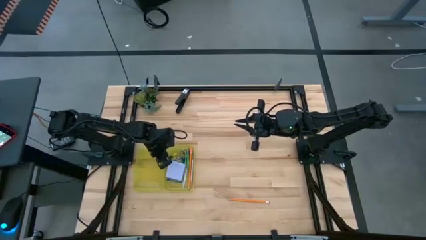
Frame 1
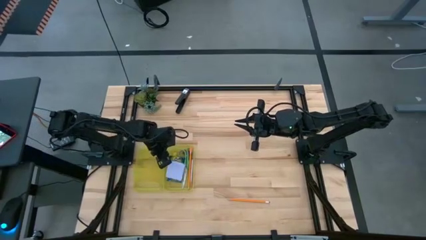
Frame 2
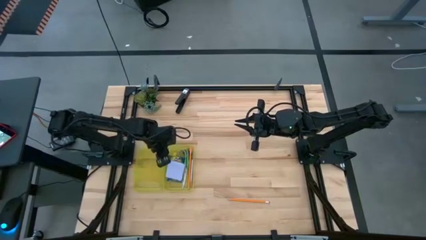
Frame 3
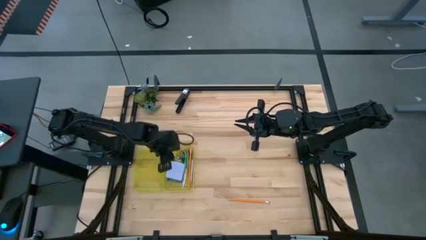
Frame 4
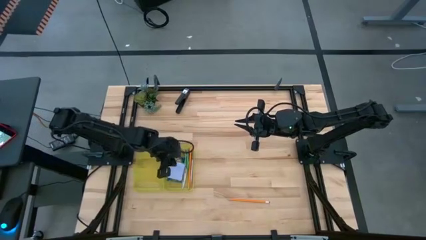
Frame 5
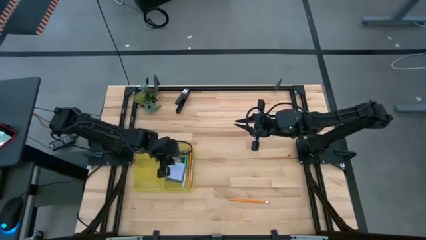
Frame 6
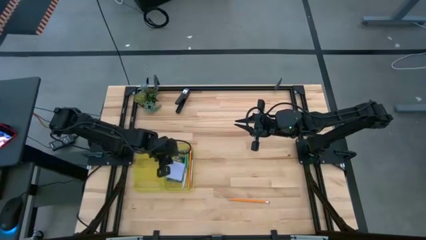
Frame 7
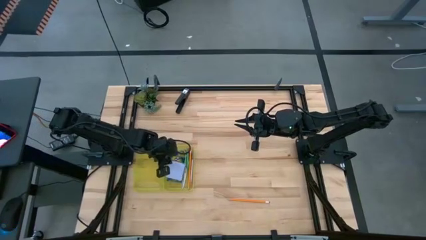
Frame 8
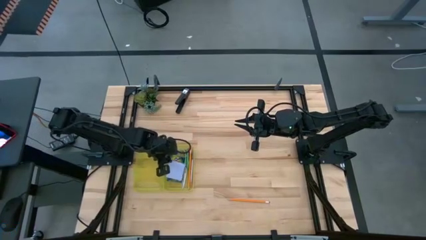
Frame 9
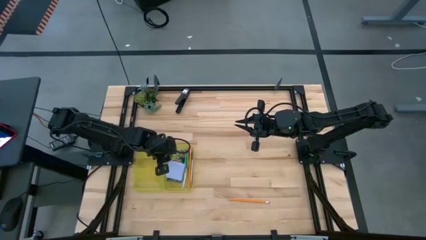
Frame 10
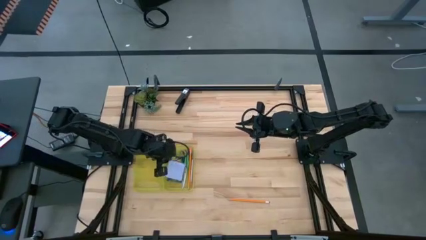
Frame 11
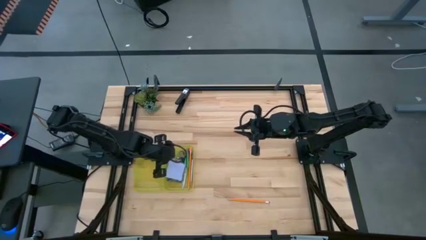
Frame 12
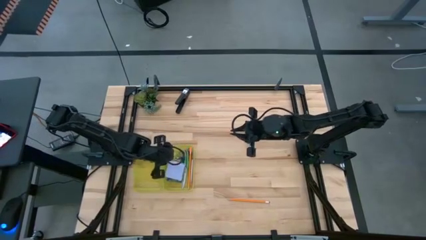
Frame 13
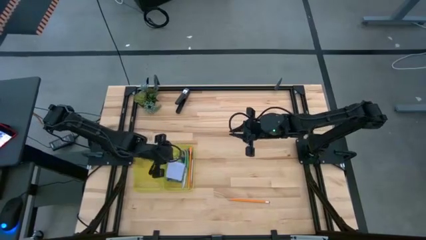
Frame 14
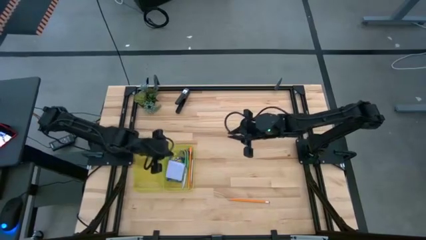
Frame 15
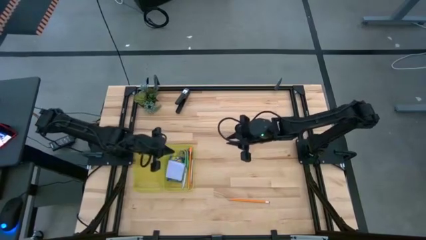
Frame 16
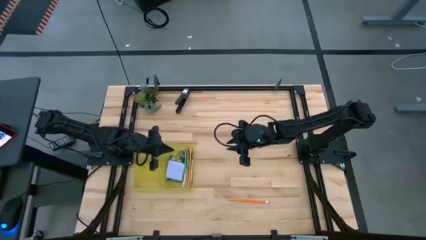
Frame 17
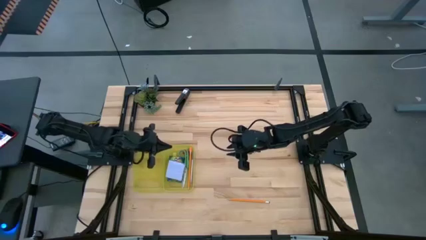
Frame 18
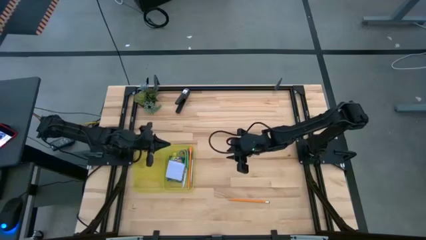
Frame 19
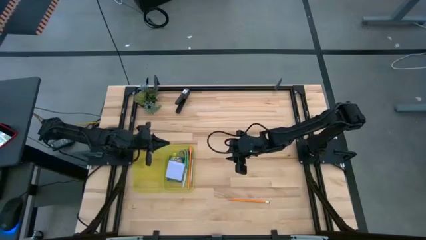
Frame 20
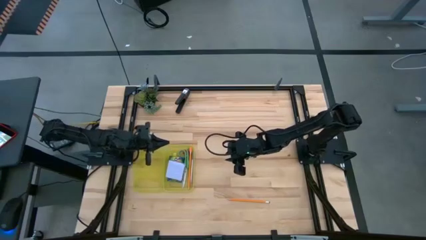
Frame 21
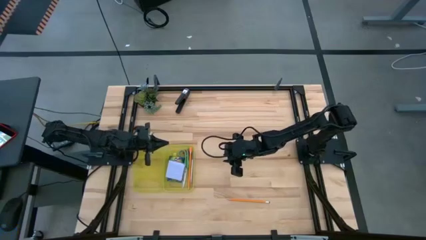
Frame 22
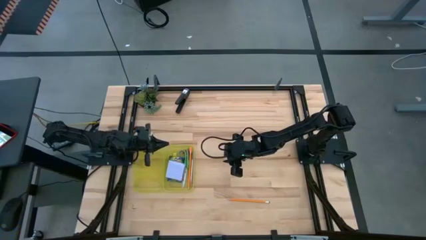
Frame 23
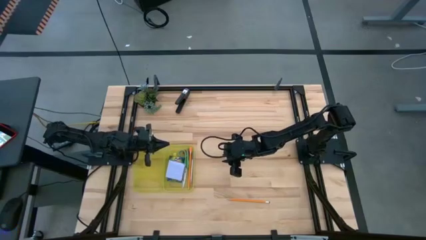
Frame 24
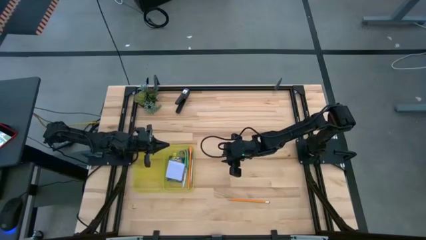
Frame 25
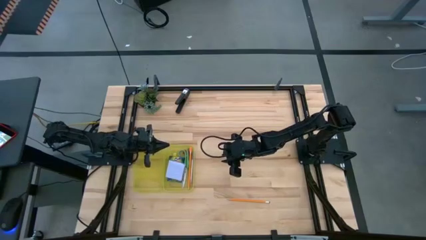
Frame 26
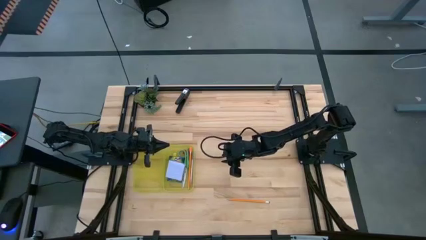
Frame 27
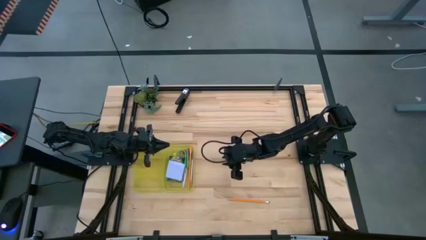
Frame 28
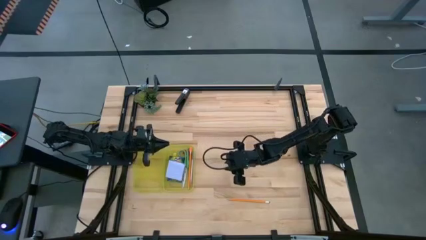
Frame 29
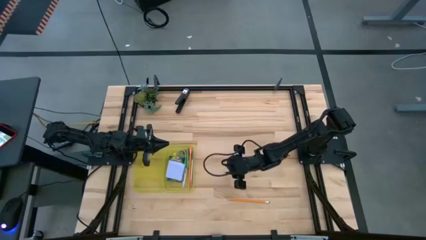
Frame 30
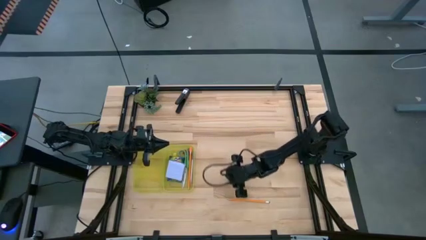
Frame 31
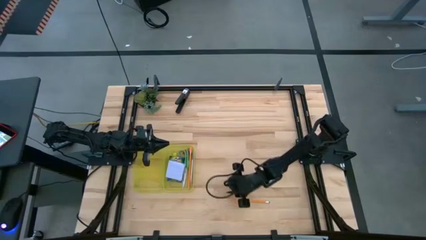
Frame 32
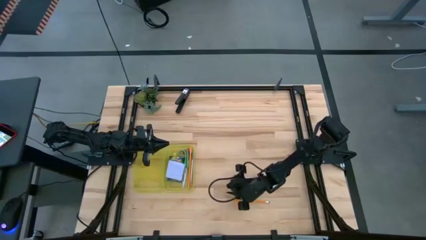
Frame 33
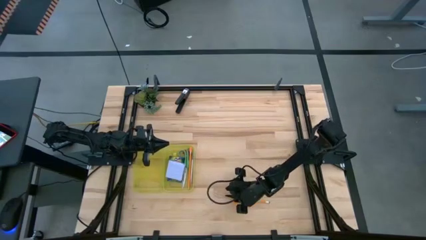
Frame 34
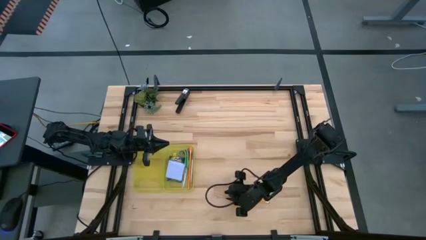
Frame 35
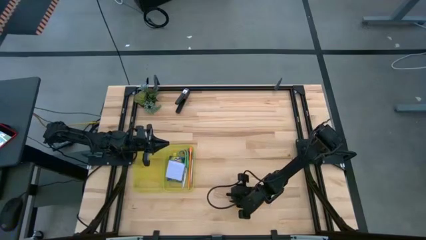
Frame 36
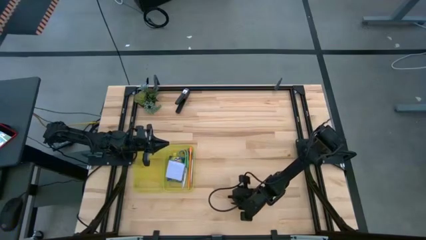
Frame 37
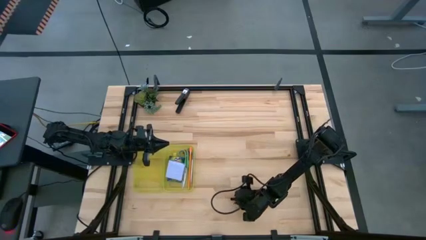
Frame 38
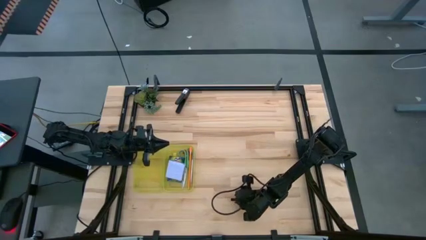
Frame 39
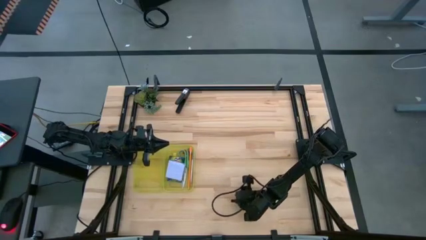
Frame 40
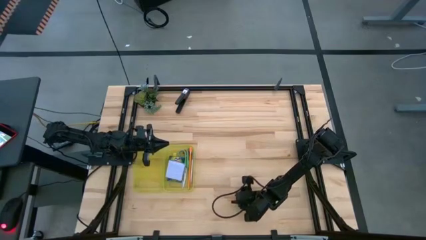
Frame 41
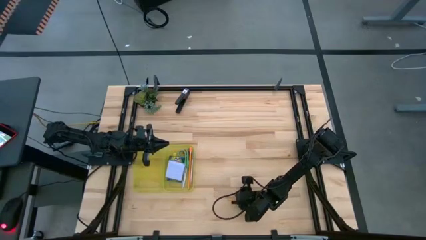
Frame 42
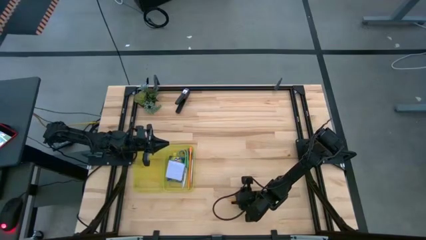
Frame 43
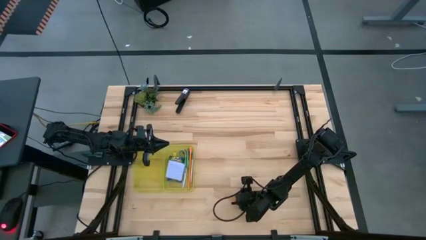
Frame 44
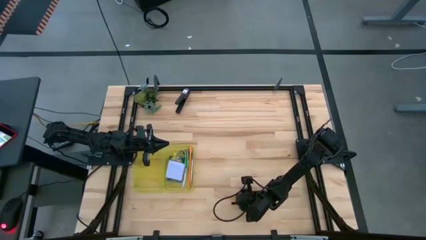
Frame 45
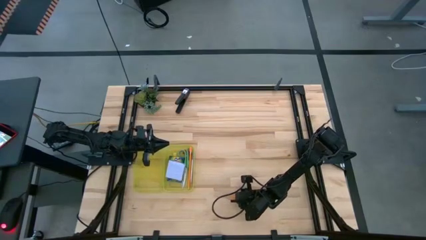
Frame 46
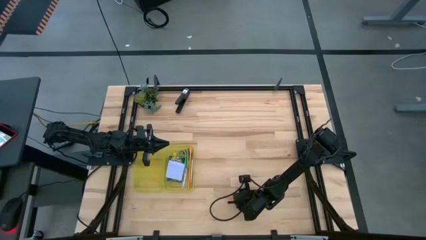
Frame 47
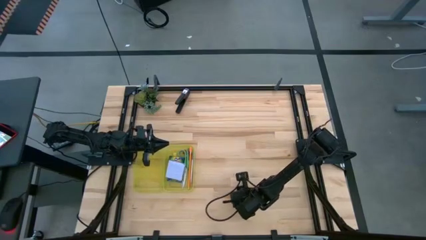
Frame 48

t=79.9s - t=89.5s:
Task: Pack school essentials
Put the orange pencil into the yellow pencil box

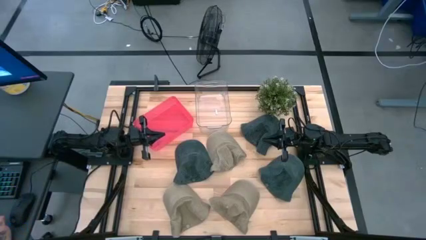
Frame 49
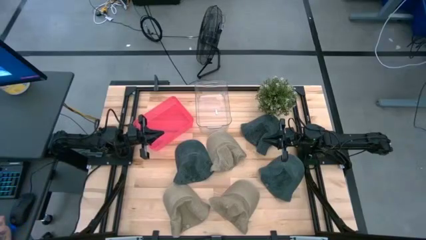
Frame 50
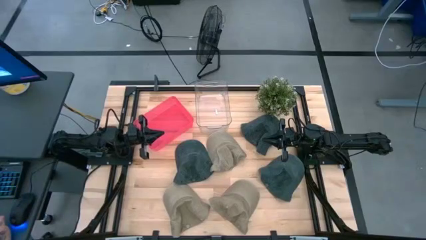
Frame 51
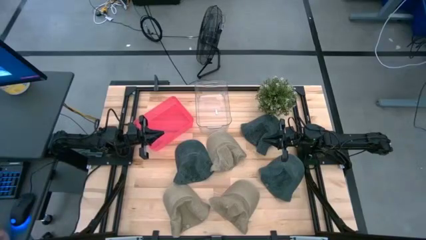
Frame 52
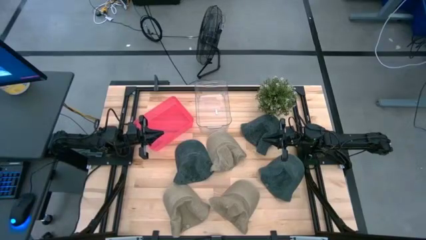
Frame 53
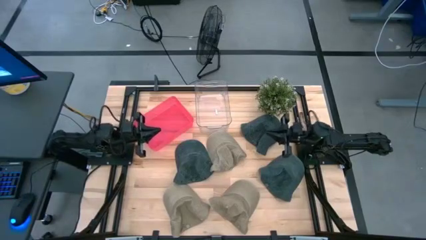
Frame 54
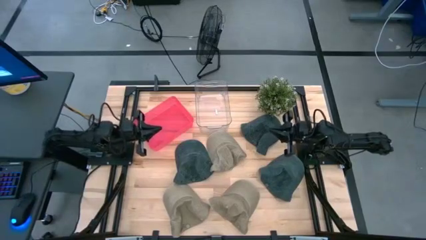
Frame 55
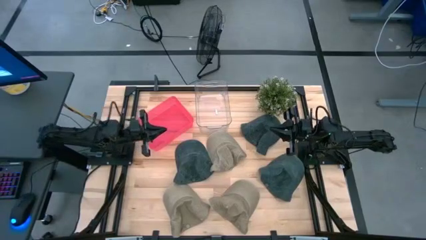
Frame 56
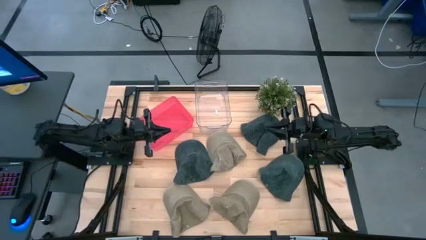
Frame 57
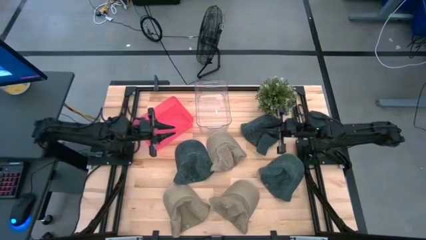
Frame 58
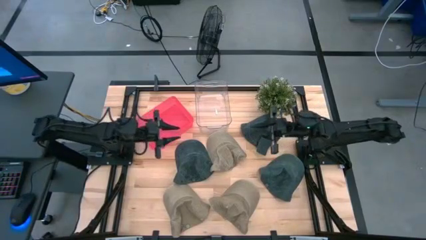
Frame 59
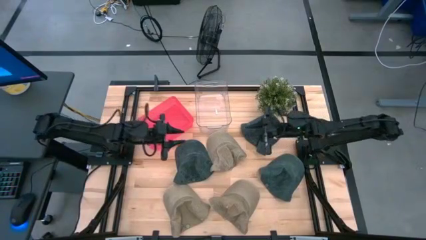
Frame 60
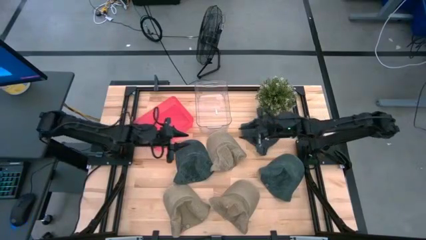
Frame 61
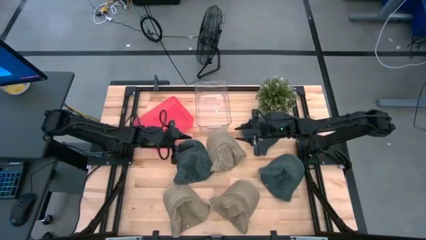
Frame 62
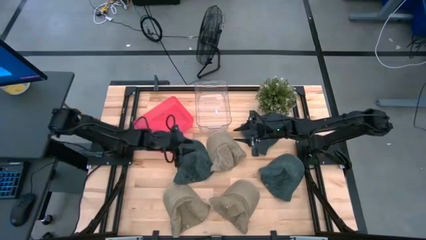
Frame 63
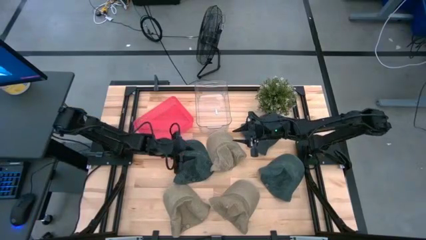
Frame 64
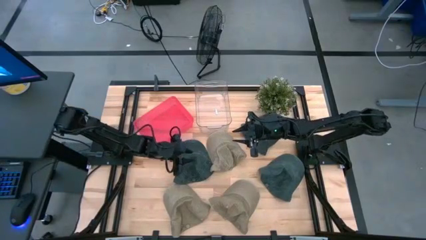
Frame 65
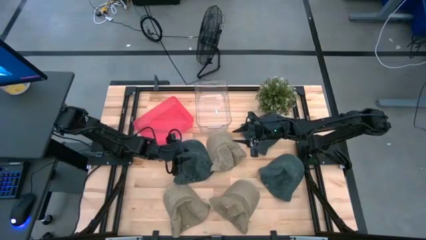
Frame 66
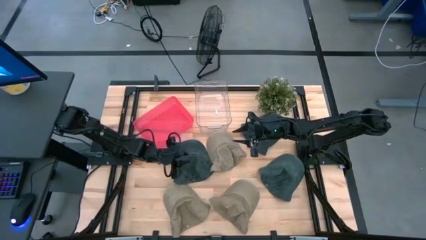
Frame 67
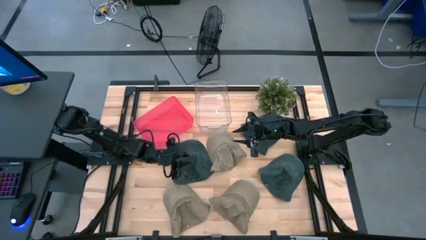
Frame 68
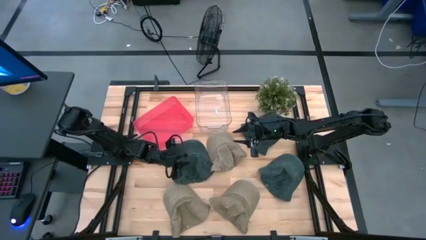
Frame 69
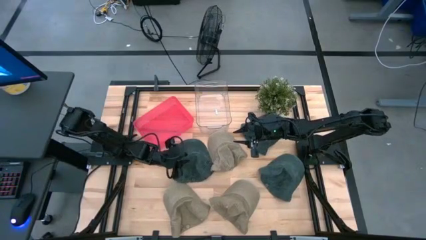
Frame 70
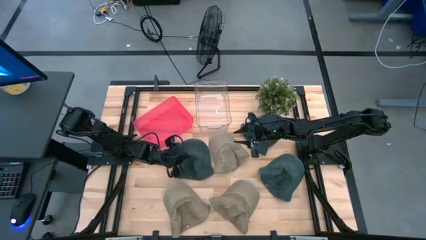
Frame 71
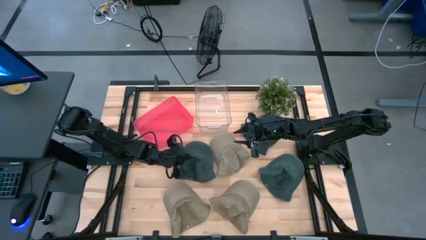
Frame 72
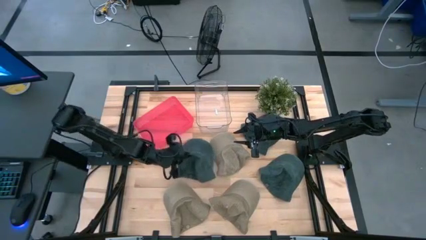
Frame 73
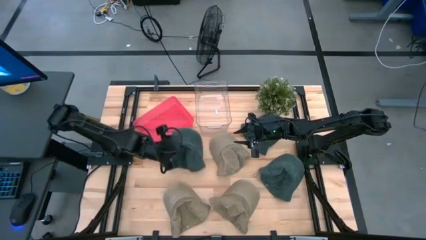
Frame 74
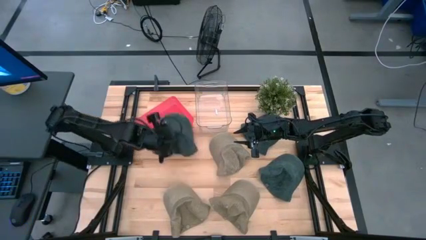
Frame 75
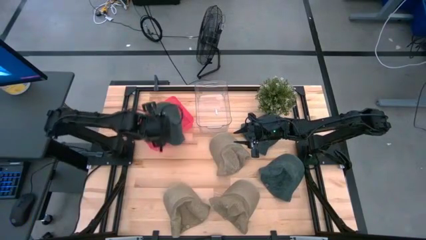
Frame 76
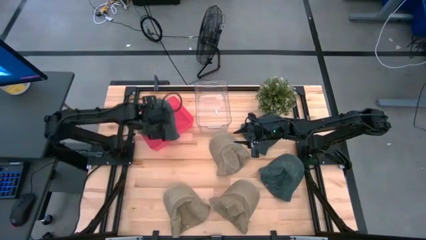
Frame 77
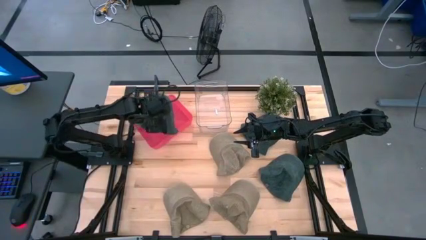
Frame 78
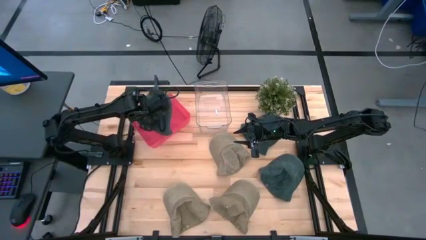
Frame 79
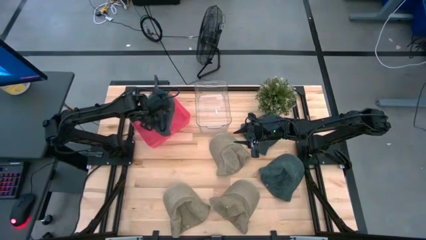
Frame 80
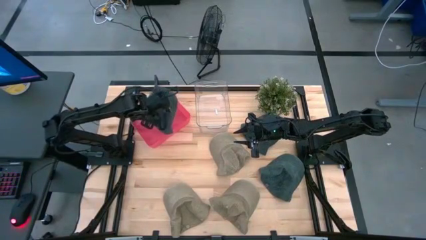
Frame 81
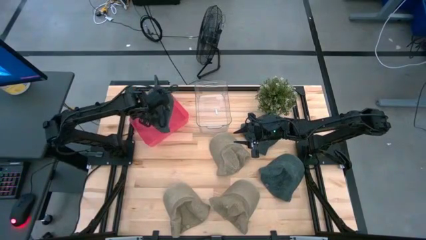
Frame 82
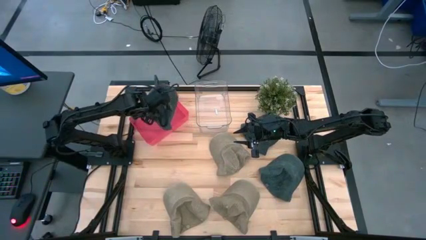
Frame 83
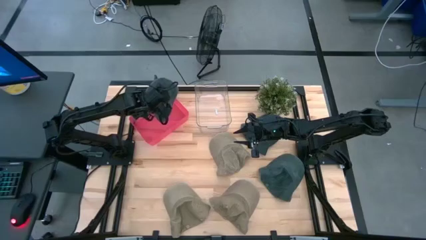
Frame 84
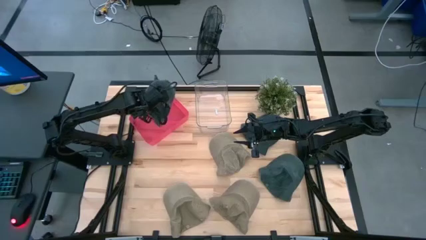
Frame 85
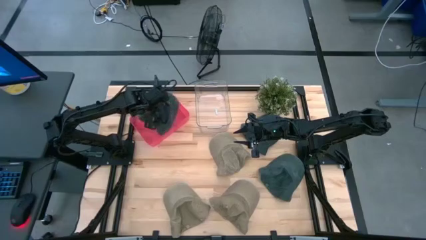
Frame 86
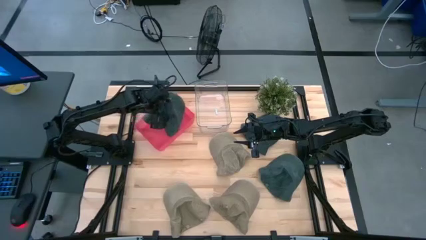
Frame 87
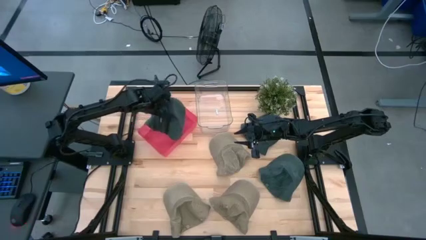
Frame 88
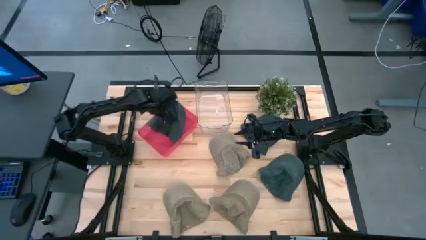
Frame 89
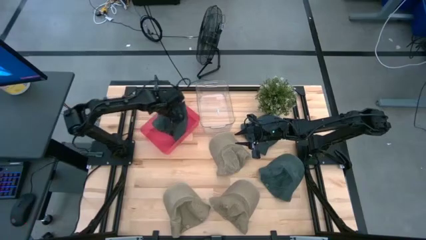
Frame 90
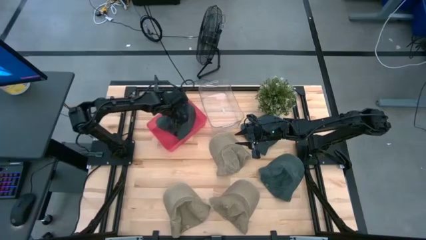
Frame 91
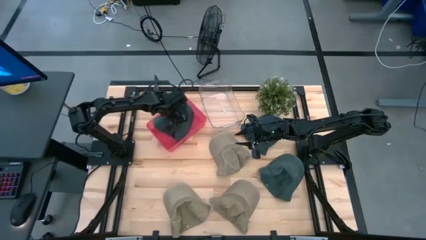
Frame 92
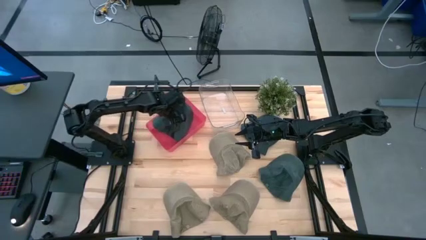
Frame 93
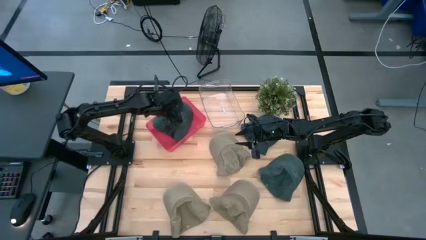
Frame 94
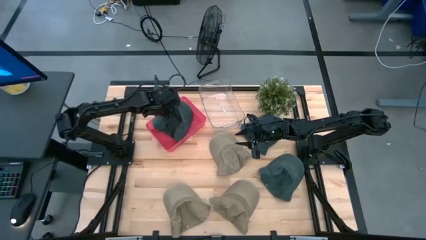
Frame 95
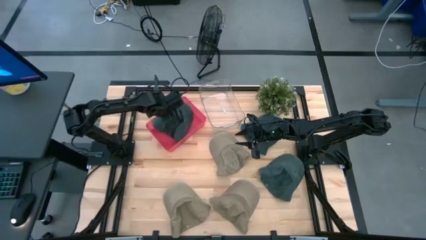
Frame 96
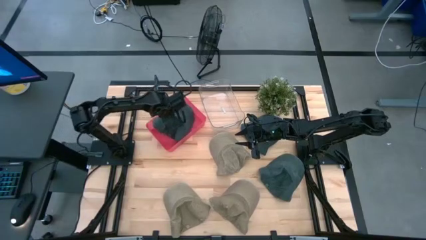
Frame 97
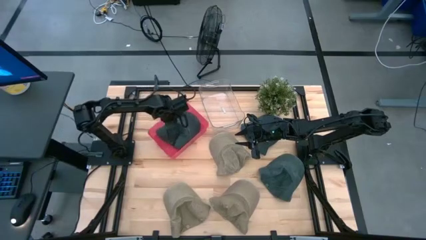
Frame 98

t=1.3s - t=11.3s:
Task: Pick & Place hat
Put the left blue cap into the red bin
